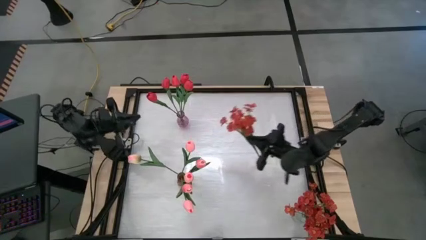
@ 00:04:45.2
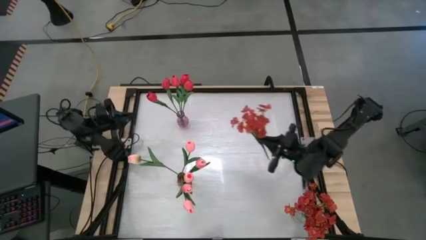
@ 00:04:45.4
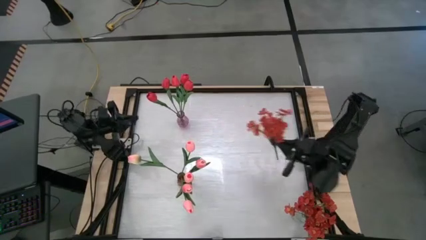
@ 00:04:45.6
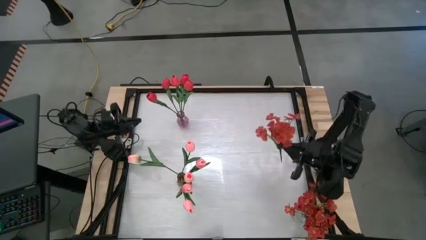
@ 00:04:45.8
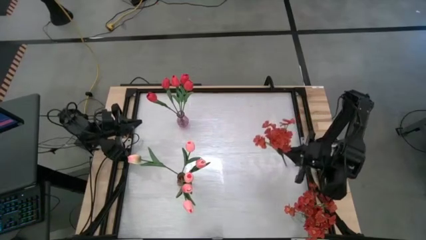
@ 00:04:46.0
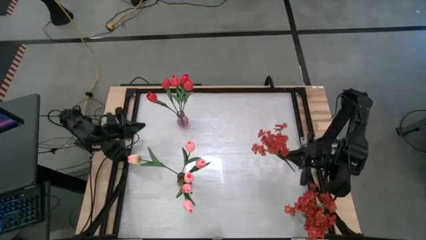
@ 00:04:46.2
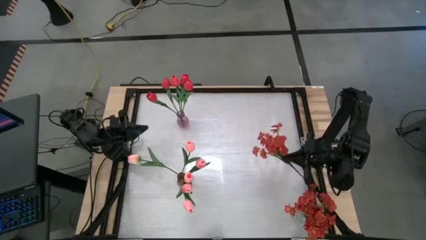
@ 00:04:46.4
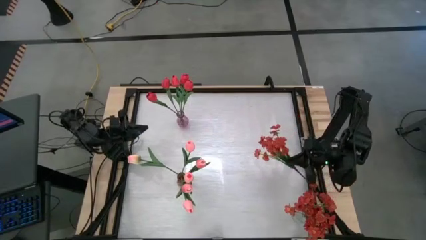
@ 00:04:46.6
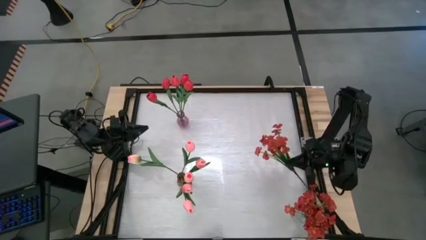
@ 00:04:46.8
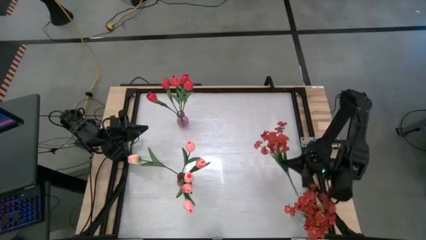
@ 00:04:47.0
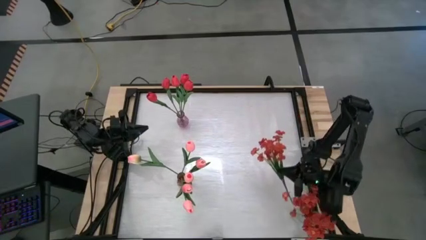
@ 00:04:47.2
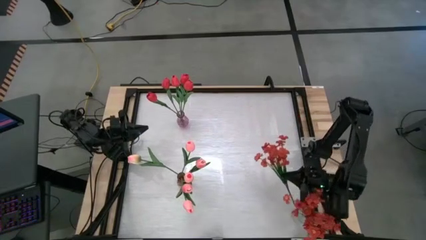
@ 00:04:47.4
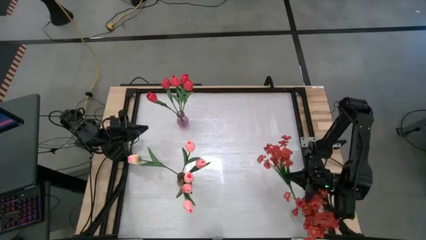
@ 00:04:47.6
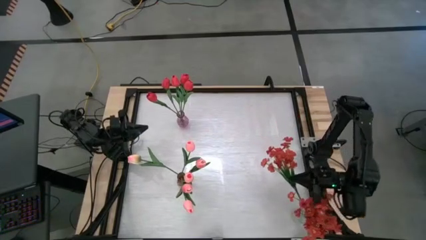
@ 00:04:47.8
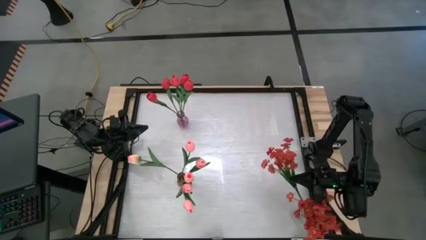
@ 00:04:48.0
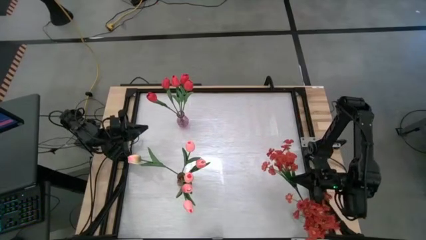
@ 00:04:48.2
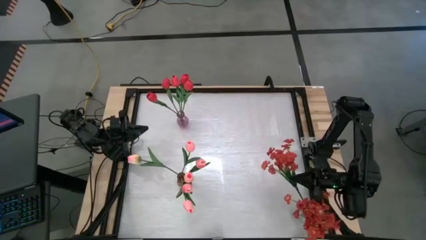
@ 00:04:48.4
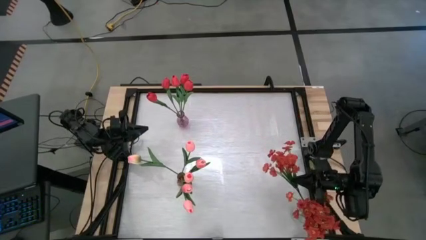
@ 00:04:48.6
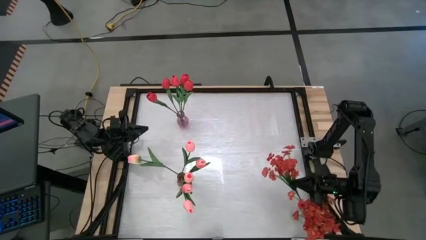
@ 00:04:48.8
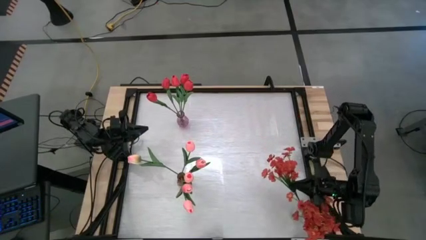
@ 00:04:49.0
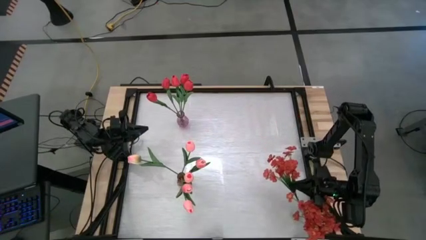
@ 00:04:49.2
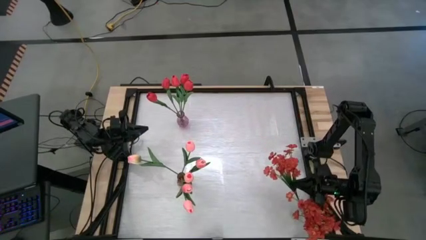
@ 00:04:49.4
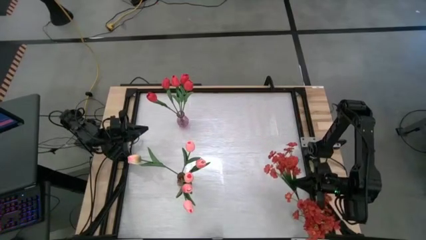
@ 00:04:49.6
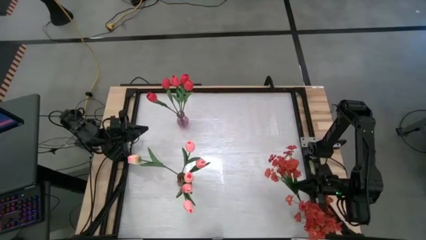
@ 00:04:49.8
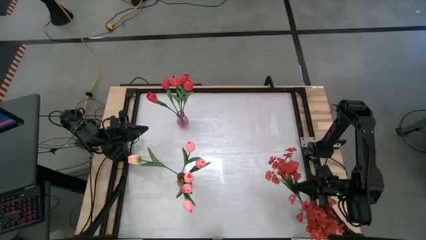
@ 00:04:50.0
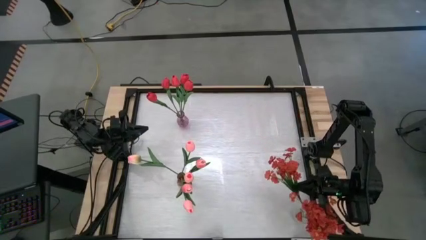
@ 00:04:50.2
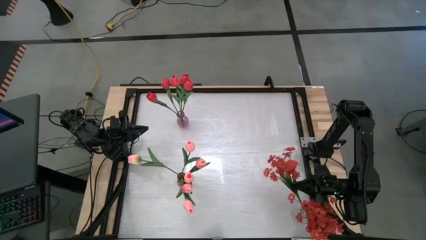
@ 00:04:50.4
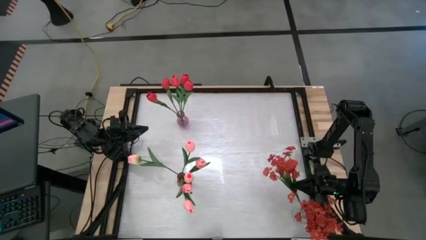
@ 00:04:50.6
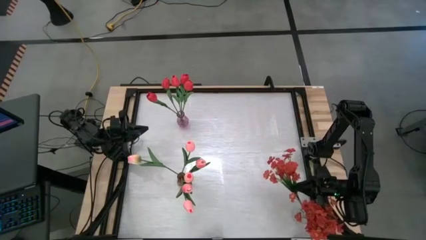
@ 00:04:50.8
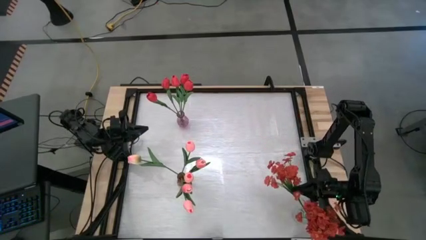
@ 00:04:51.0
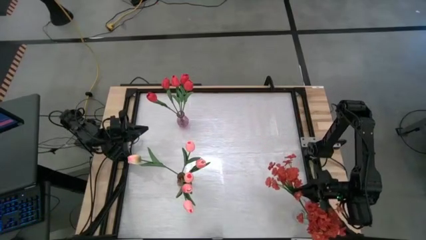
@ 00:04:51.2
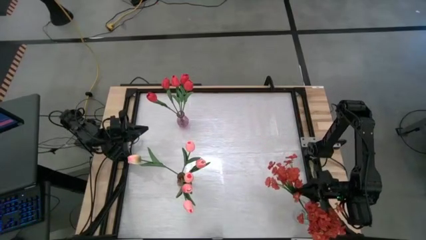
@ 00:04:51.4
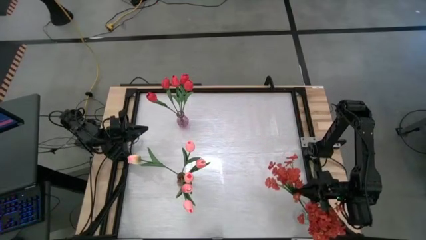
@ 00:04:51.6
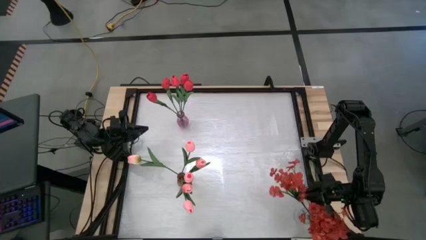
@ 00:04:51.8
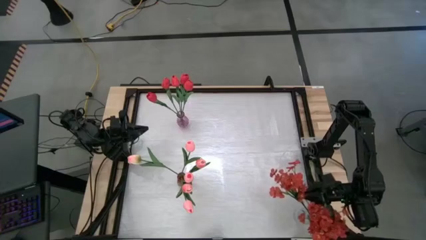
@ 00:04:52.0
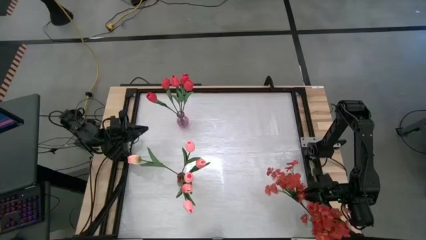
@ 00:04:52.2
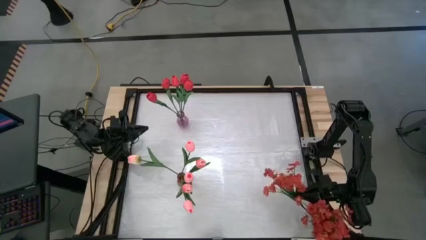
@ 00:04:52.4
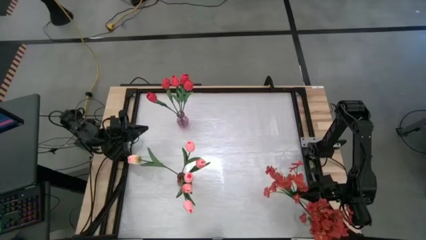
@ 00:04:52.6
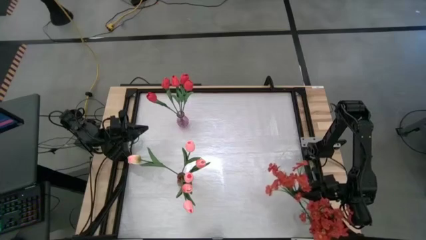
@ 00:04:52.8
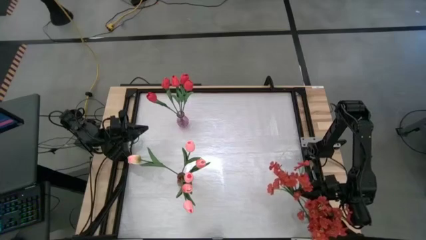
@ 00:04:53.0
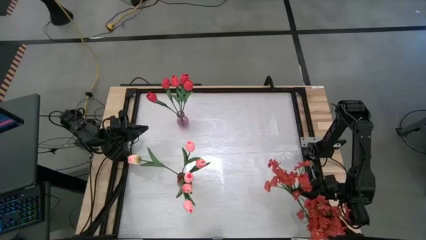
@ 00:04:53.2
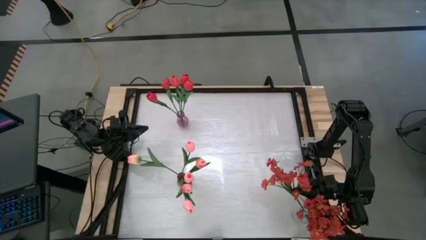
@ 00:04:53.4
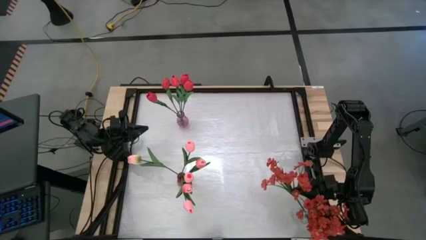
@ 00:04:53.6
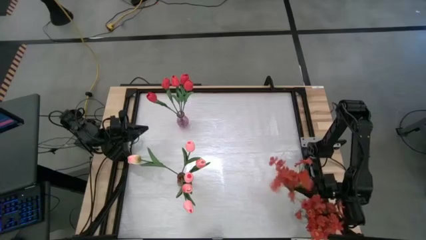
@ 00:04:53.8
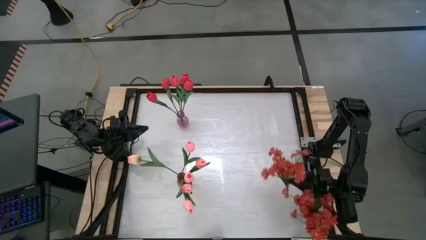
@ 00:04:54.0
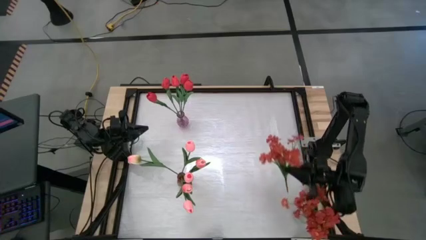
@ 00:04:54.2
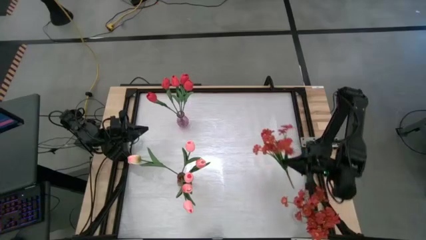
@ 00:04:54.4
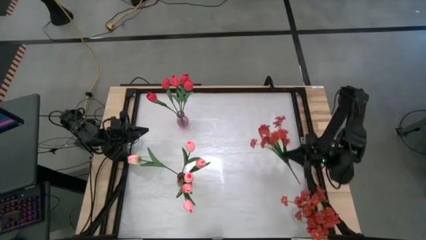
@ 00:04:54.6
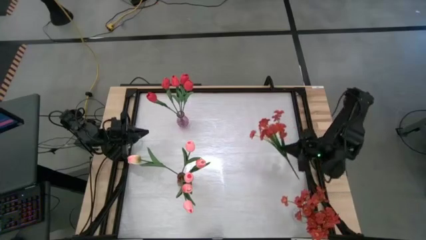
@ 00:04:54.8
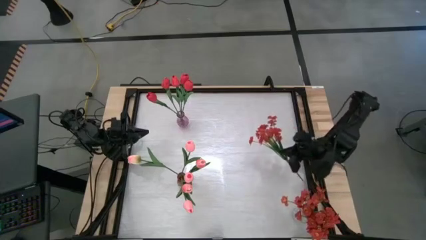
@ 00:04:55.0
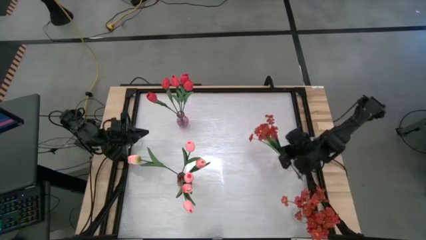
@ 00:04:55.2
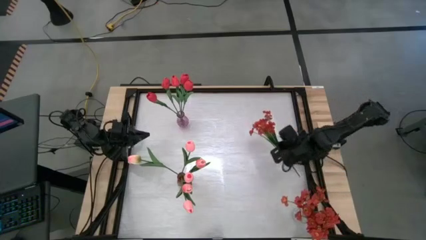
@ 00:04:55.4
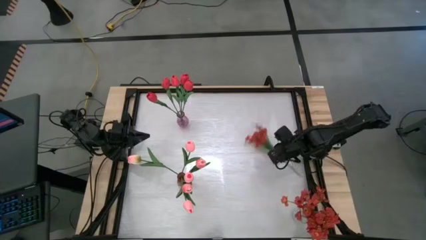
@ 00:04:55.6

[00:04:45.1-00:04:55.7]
Task: Sort flowers into vase by color
Put the red flowers into the transparent vase

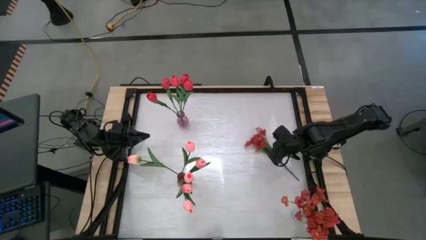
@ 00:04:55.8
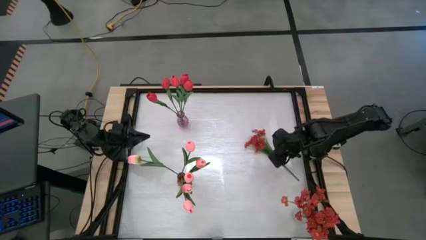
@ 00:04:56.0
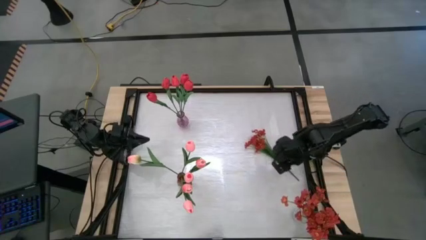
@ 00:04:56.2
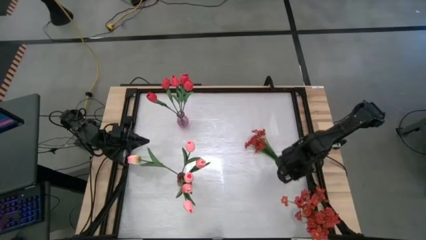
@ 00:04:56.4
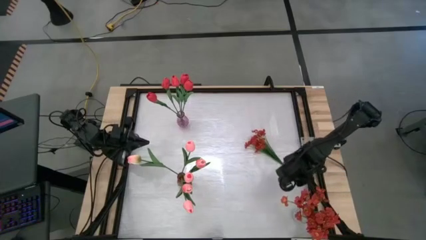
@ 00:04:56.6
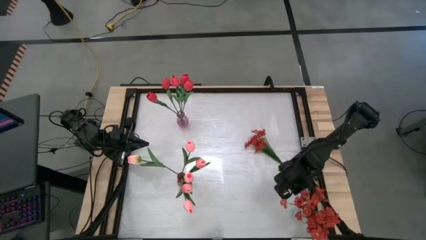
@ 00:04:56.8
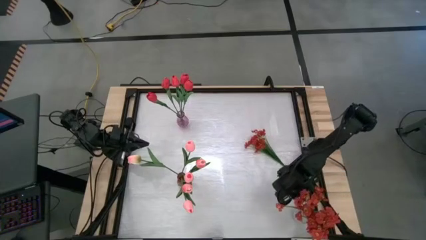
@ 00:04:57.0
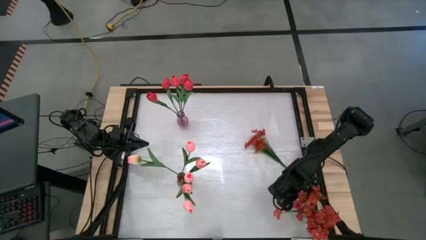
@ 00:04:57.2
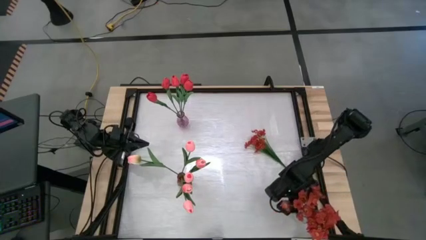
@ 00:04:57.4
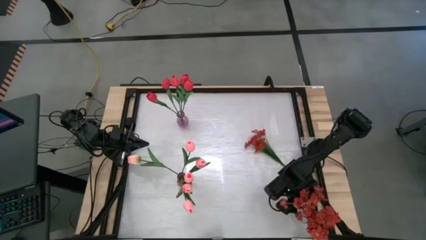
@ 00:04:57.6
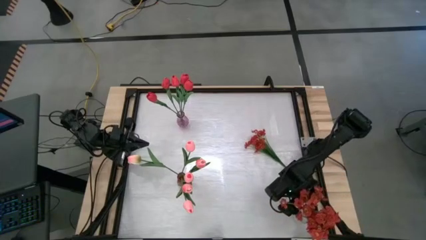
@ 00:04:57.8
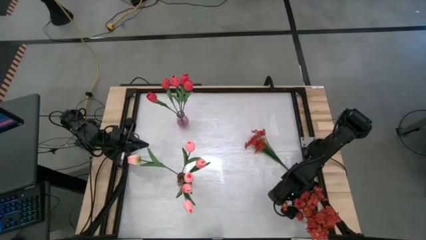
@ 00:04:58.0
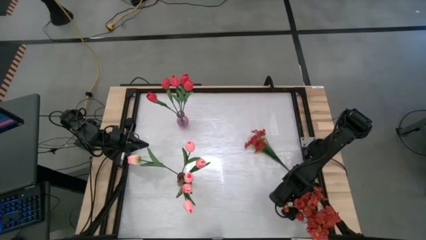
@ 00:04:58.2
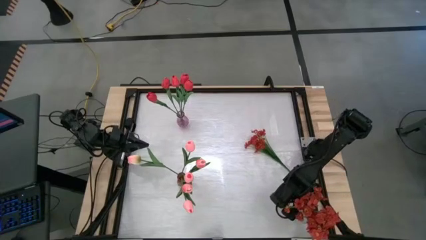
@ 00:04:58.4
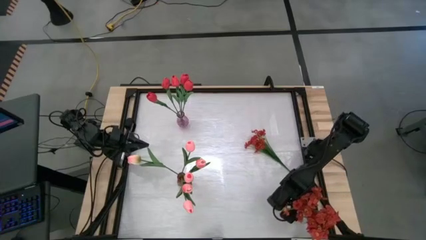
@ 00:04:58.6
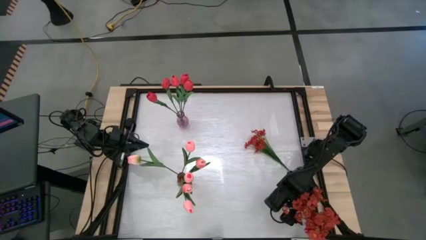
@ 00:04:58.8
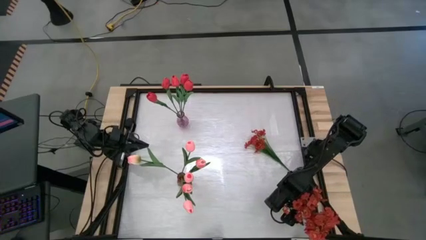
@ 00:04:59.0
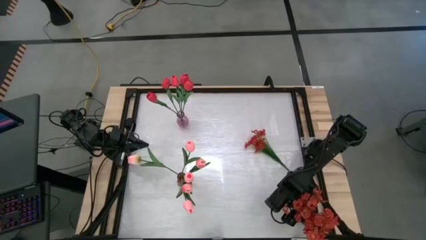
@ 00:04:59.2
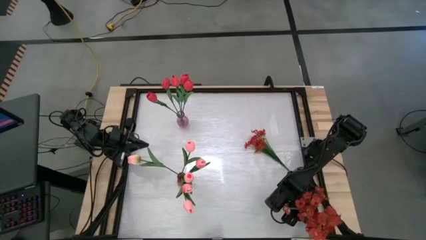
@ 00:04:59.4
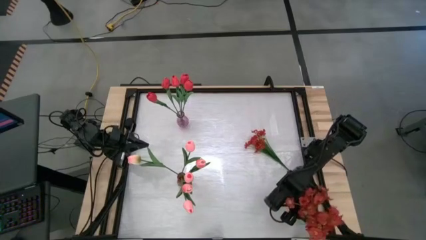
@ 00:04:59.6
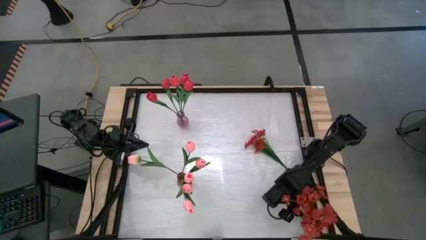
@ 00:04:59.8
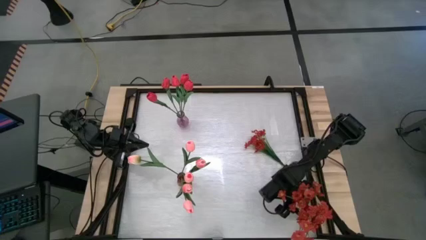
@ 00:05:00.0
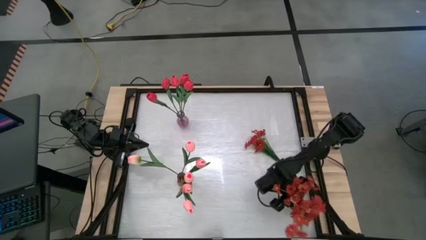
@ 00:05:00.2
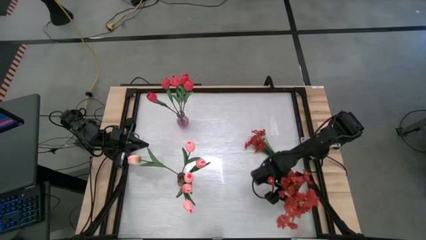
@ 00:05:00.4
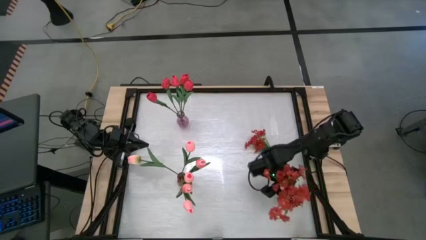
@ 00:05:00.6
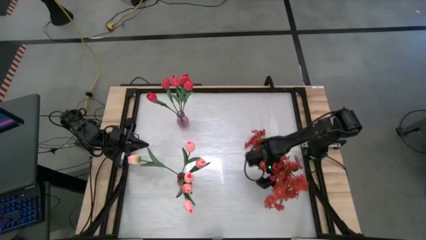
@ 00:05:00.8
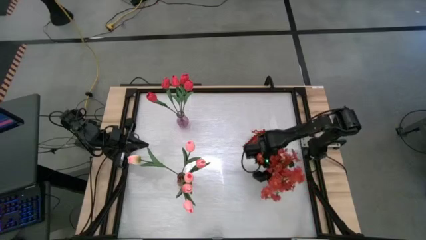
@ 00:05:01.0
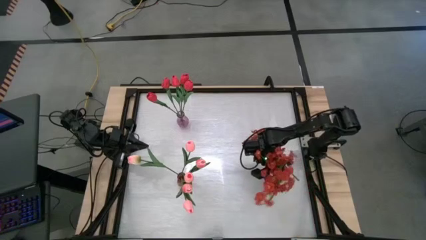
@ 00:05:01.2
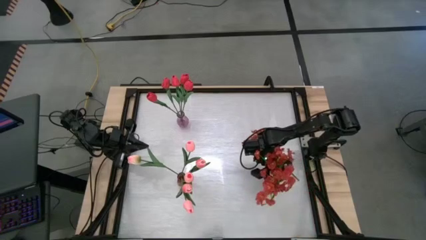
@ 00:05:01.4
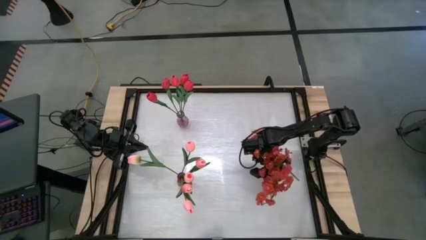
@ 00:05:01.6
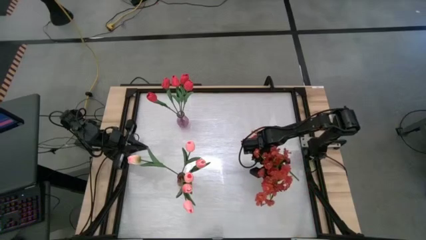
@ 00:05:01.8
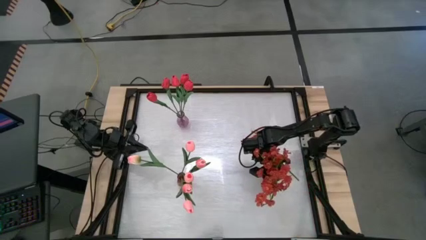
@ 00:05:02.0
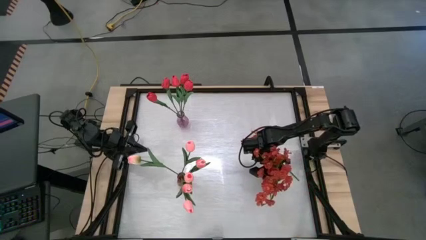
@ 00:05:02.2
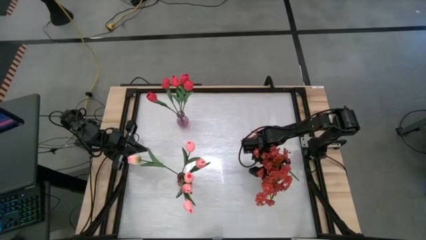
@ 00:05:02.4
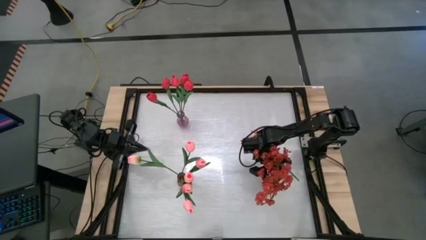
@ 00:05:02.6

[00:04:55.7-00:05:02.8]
Move the transparent vase to the middle right of the table
